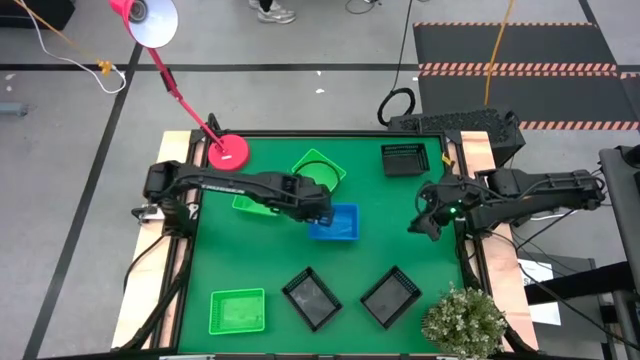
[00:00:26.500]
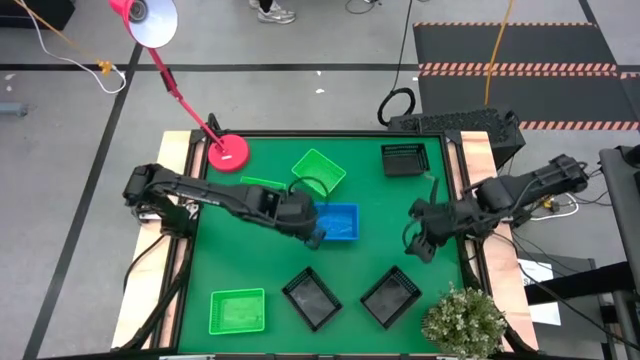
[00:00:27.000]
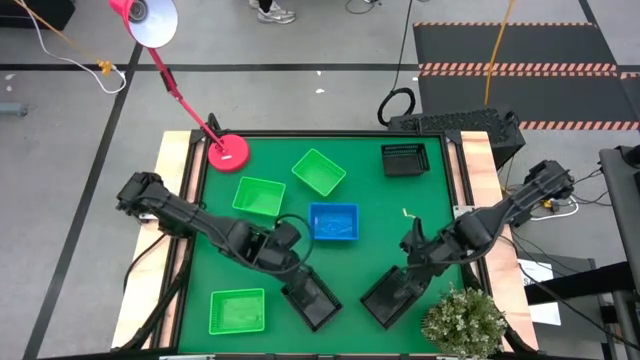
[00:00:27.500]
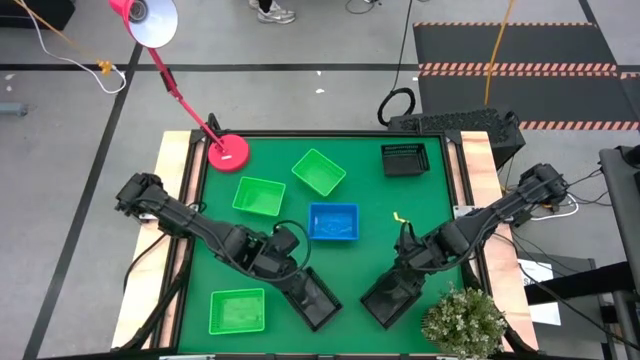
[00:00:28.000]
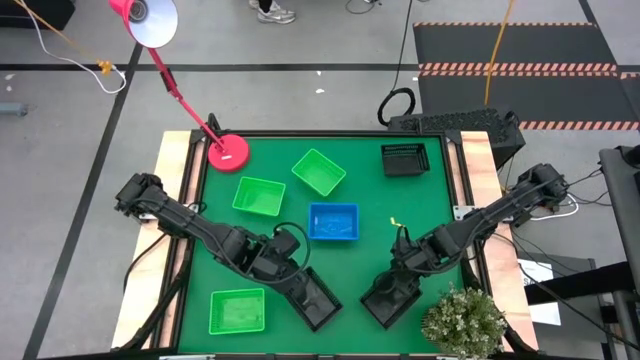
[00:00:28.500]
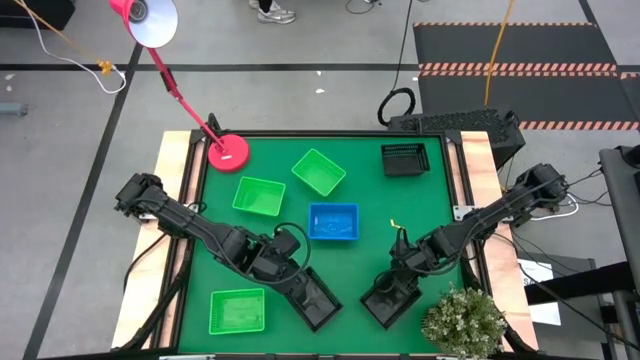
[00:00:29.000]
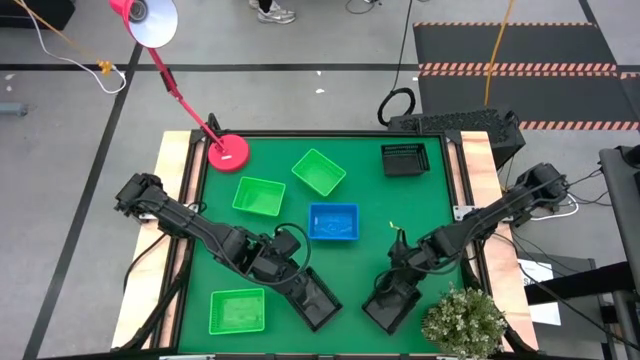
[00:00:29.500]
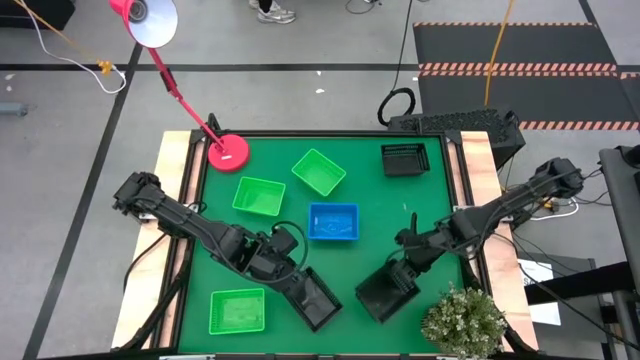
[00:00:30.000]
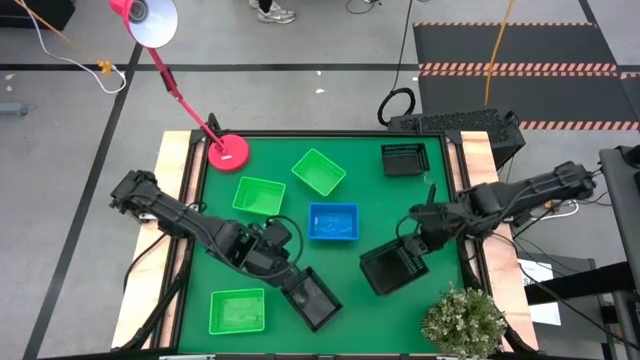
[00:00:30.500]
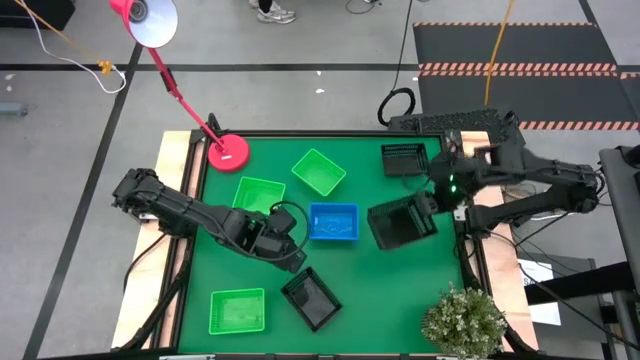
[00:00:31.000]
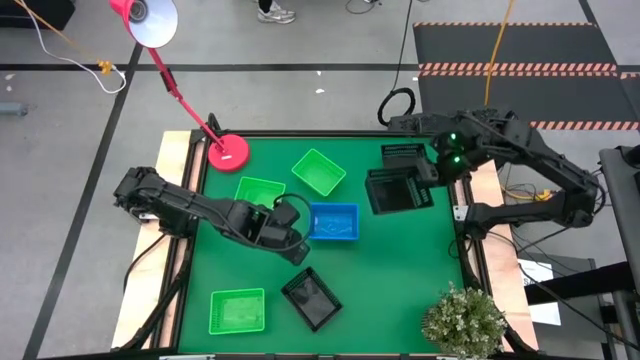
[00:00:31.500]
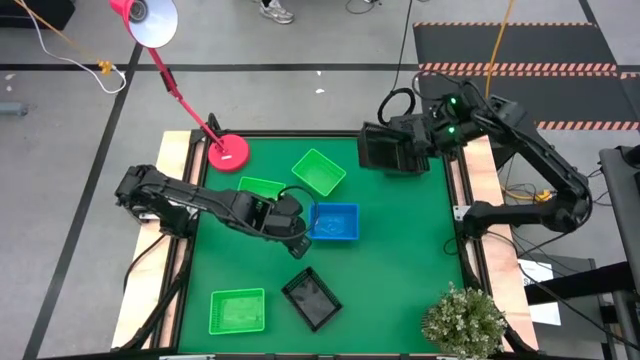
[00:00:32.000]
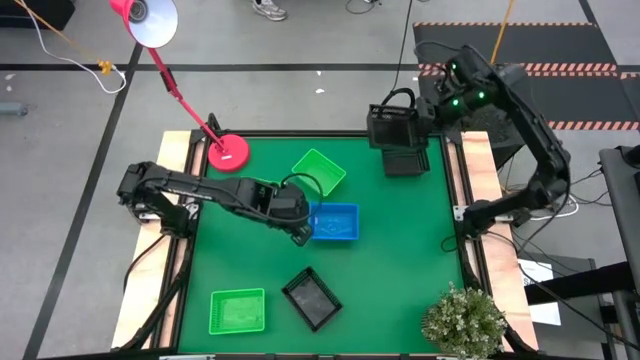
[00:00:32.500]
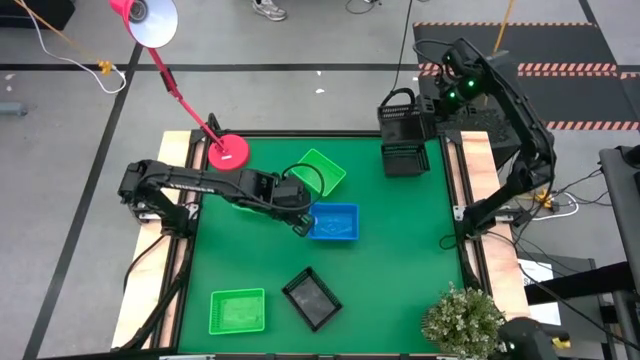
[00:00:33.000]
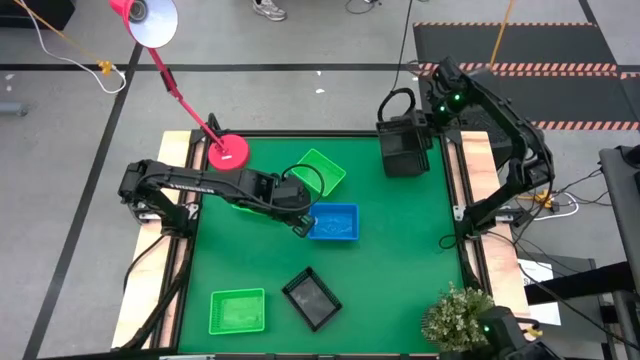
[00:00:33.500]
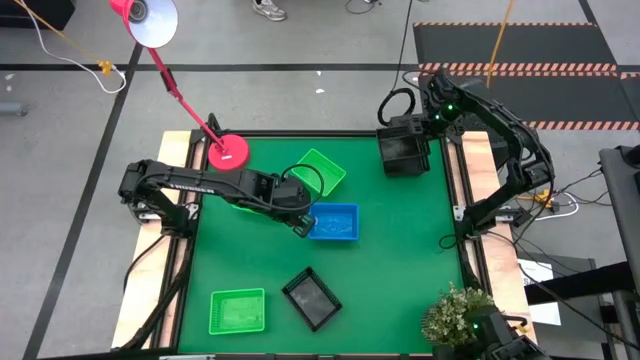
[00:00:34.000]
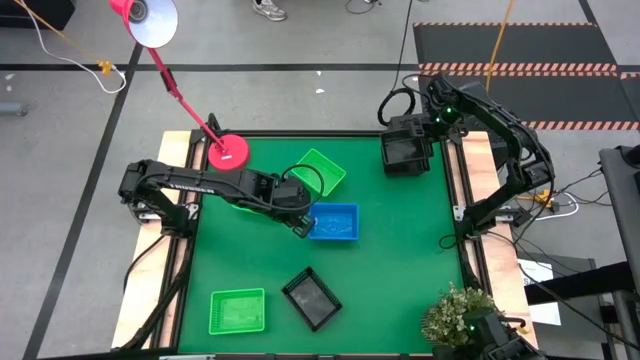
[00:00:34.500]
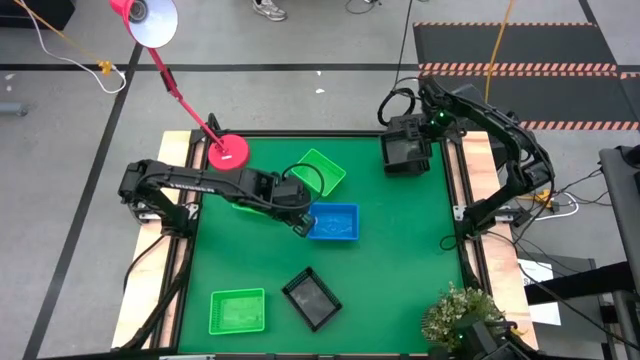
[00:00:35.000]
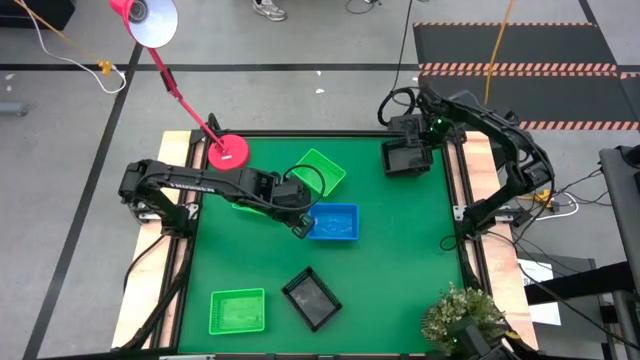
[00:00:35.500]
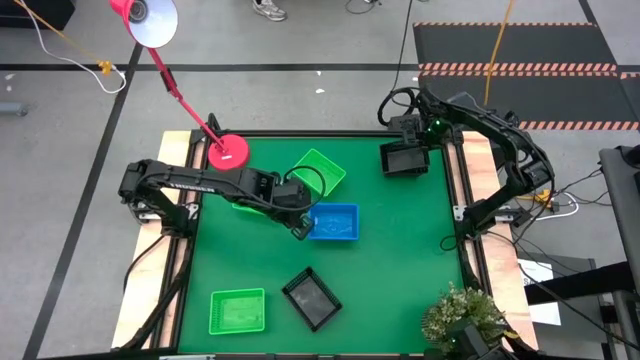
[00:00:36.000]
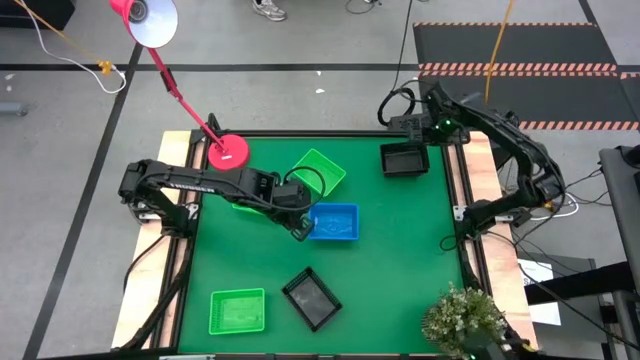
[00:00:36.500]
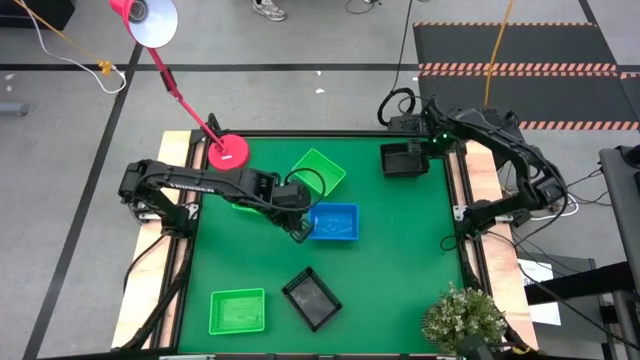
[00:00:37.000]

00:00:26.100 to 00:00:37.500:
Stack the bottom right black bin on the top black bin

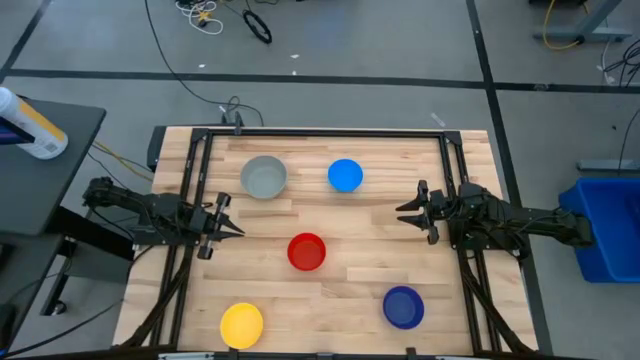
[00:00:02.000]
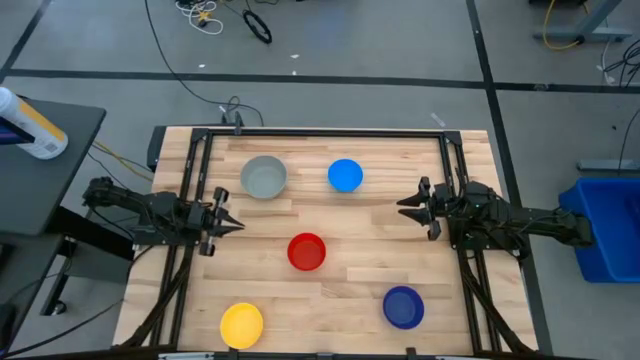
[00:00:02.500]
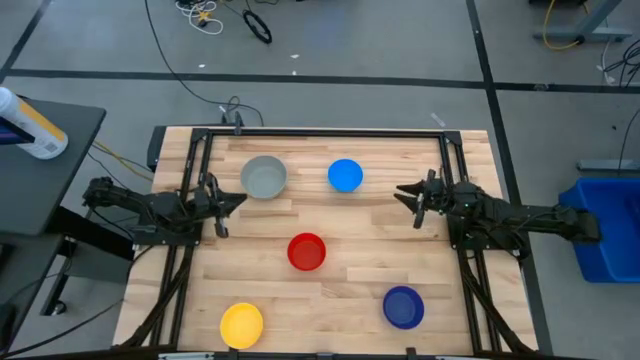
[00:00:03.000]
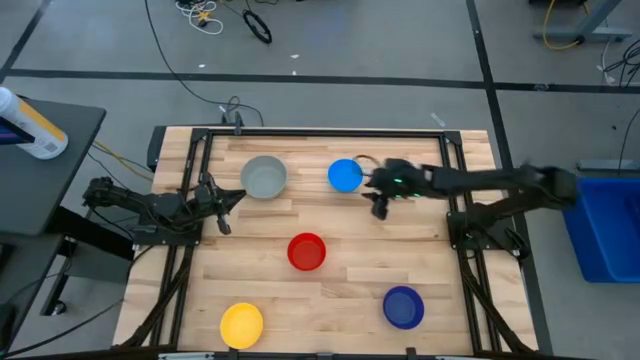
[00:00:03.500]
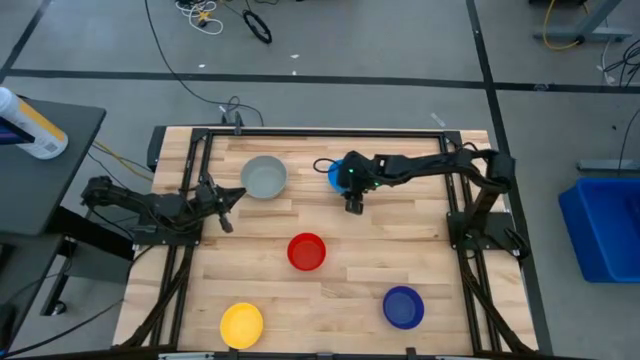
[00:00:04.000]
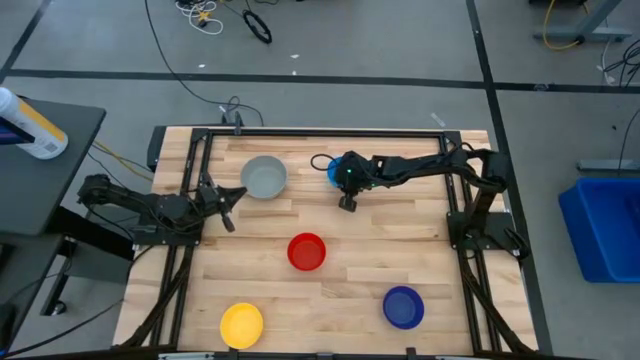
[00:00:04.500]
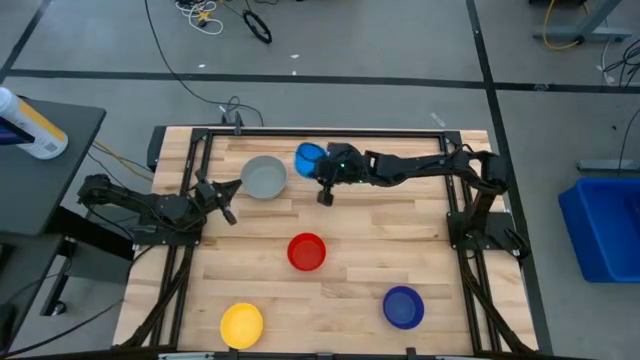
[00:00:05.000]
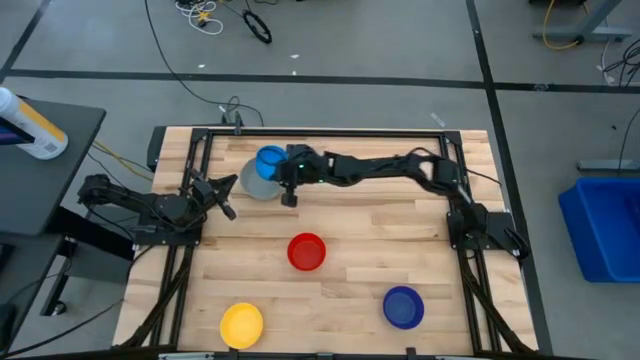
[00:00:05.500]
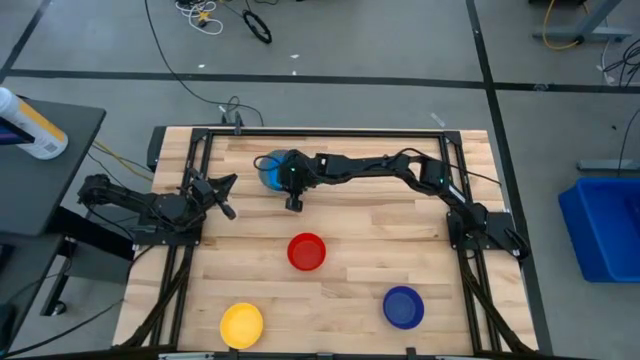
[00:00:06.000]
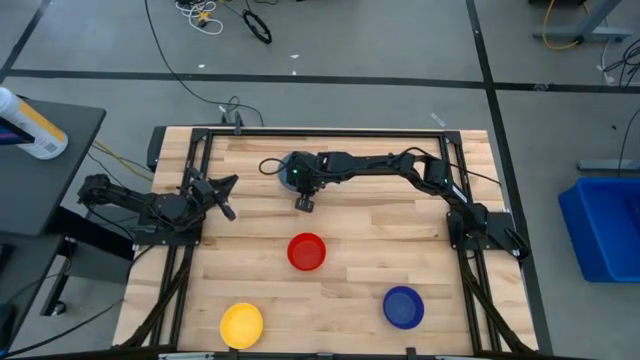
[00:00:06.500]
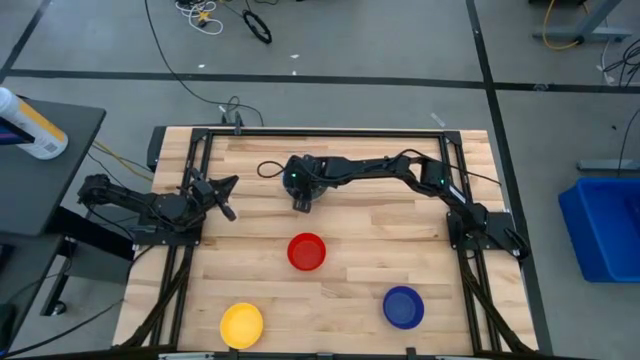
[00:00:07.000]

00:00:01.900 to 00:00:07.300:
Stack the light blue bowl on top of the gray bowl

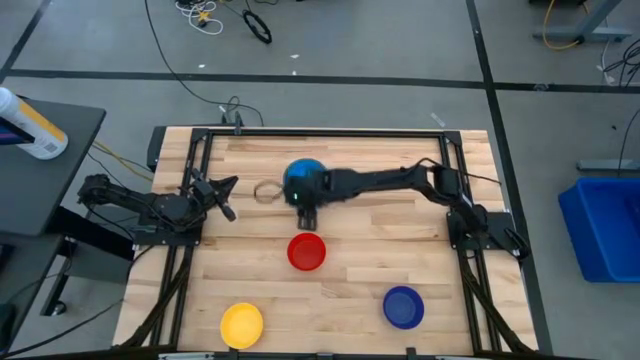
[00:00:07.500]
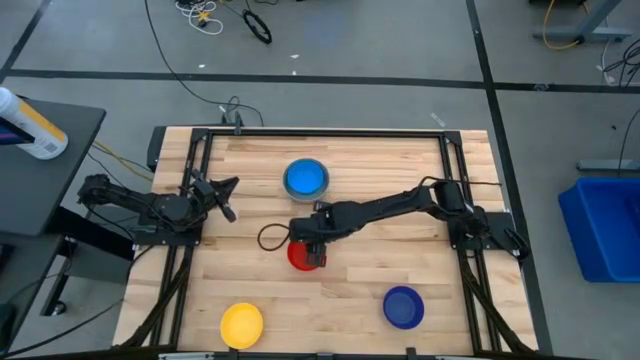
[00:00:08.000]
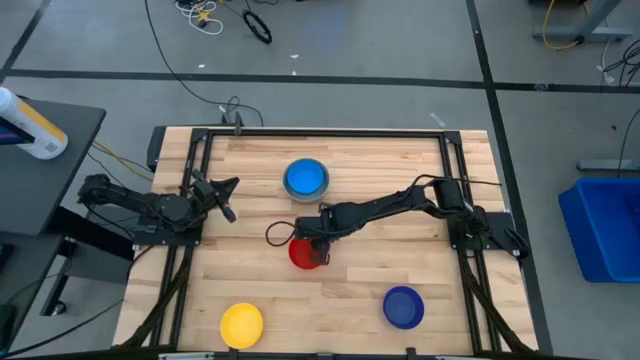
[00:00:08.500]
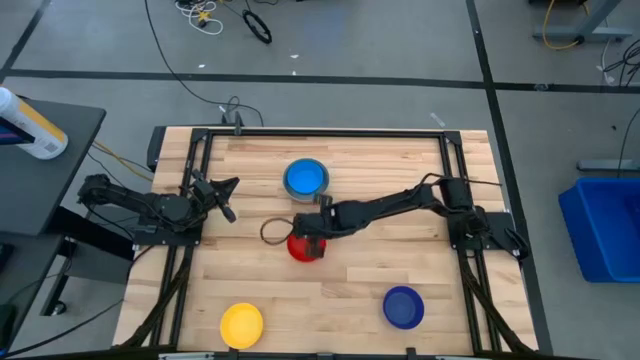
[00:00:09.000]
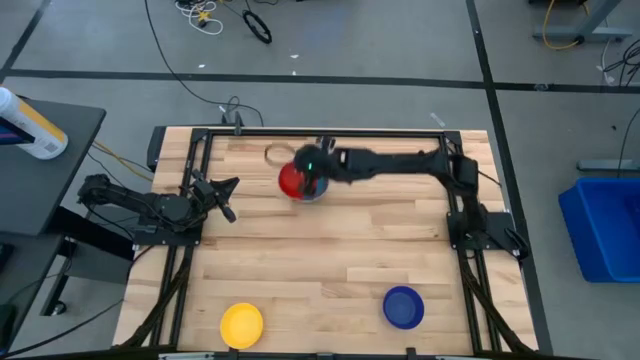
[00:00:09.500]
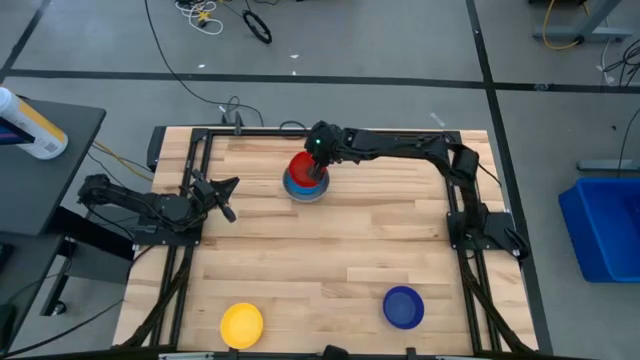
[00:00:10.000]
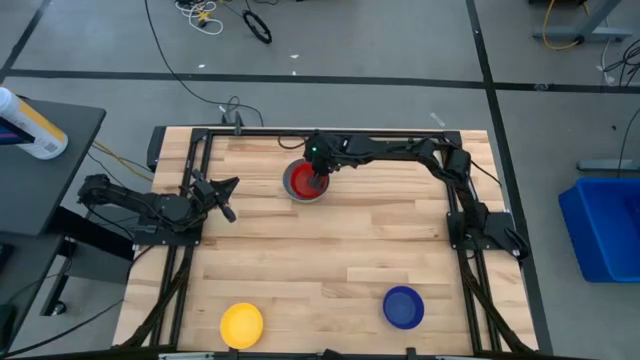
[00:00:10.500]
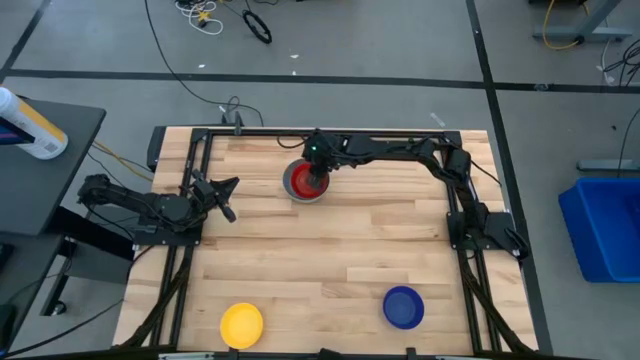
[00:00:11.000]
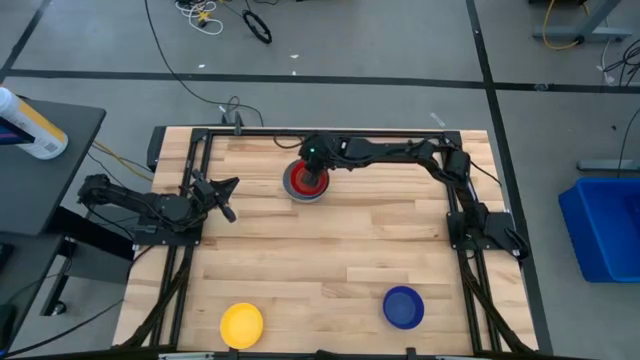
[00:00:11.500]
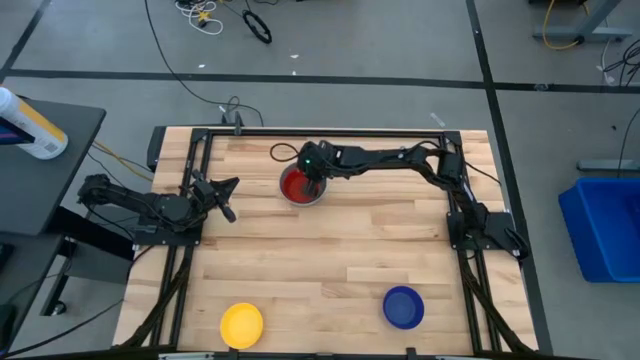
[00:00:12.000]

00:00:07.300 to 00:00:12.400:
Stack the red bowl on top of the light blue bowl
